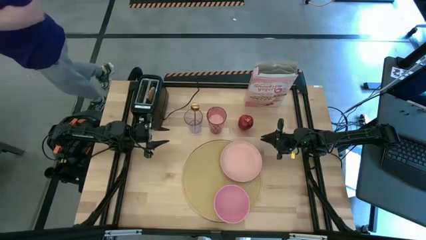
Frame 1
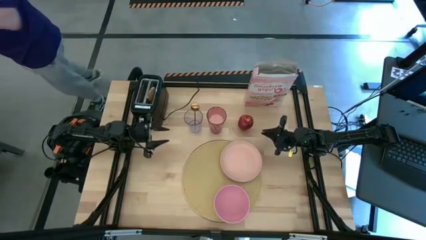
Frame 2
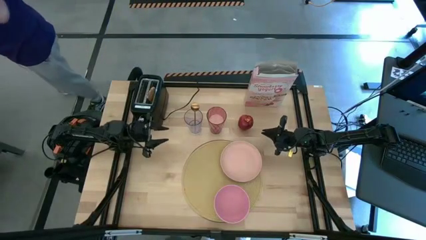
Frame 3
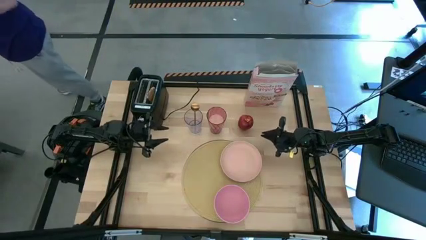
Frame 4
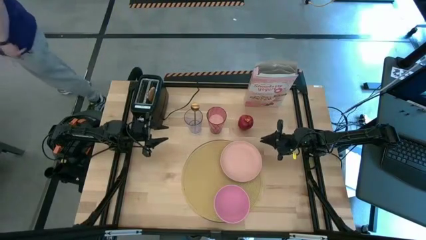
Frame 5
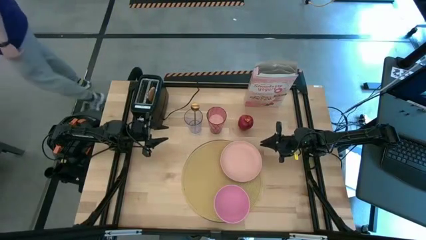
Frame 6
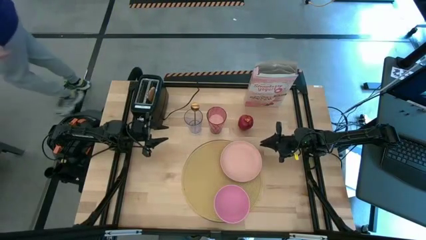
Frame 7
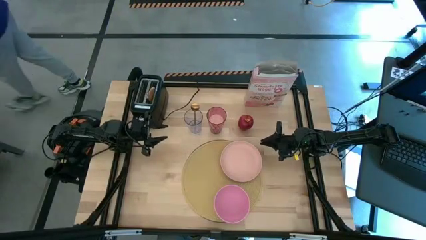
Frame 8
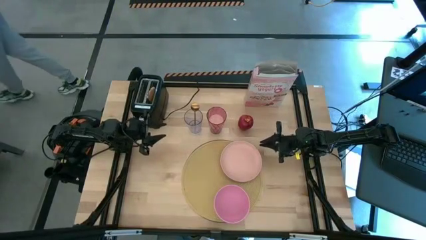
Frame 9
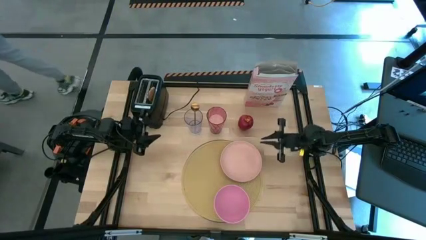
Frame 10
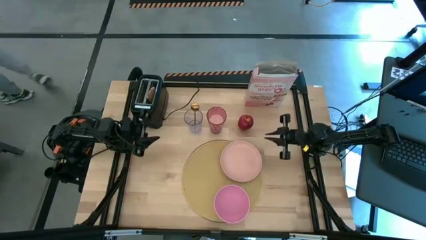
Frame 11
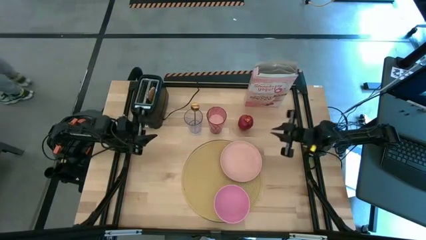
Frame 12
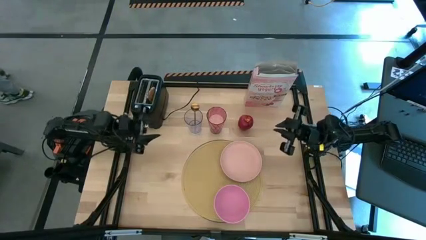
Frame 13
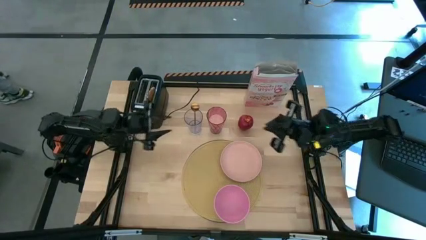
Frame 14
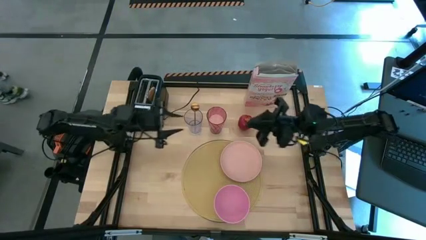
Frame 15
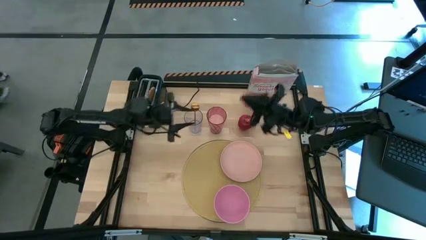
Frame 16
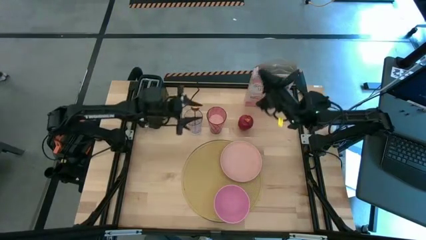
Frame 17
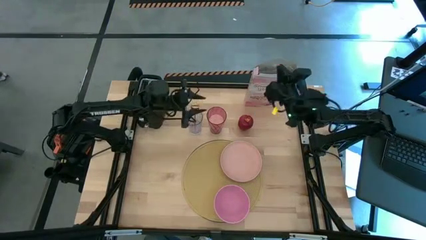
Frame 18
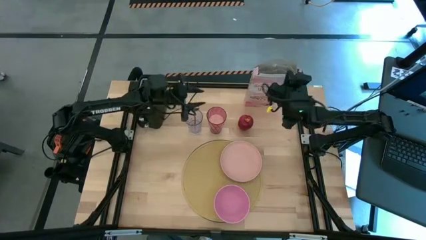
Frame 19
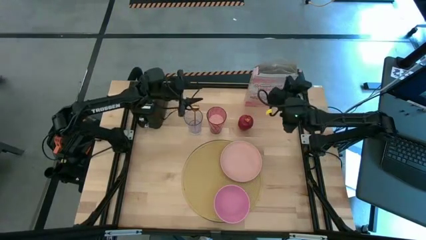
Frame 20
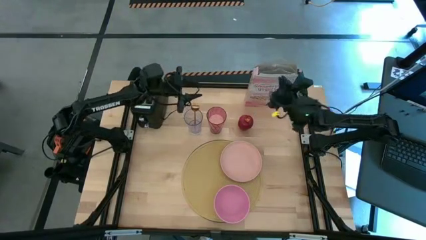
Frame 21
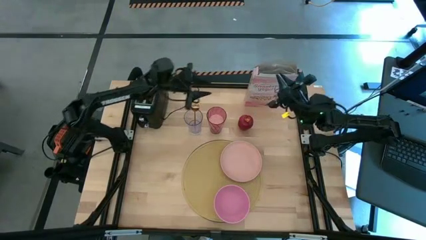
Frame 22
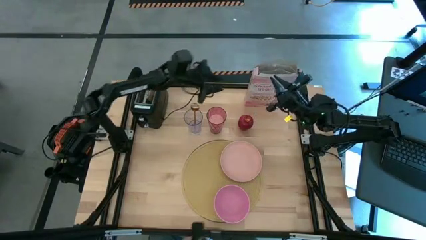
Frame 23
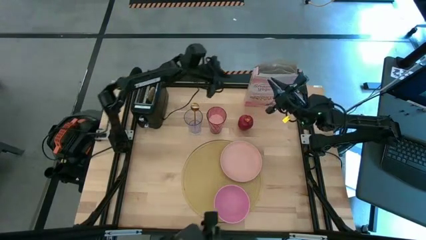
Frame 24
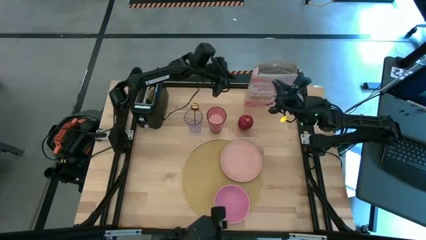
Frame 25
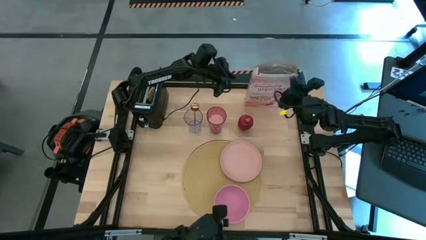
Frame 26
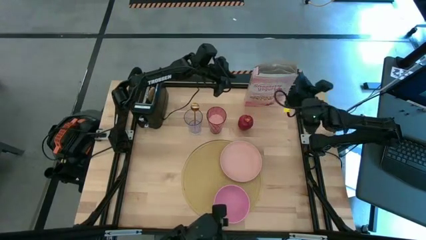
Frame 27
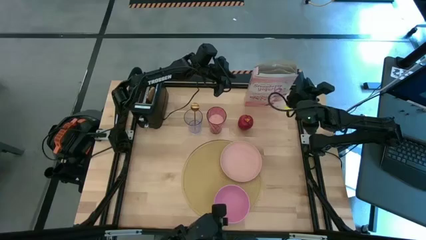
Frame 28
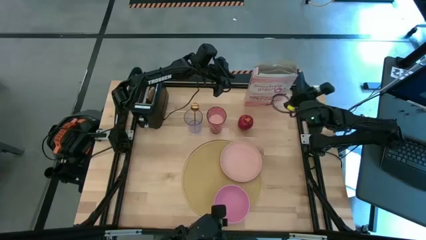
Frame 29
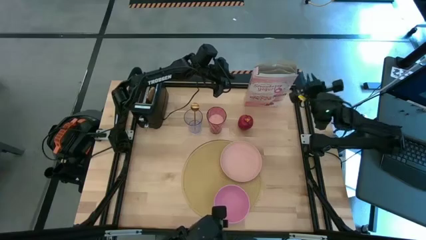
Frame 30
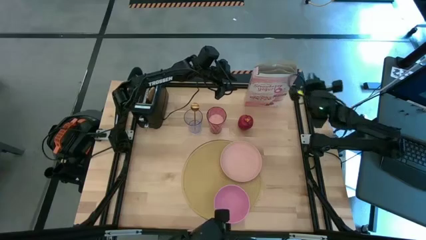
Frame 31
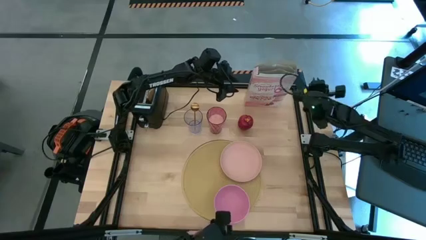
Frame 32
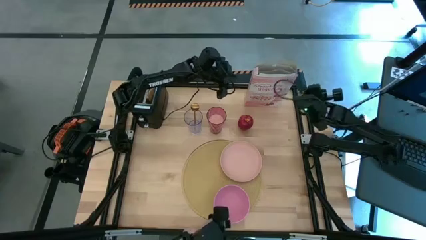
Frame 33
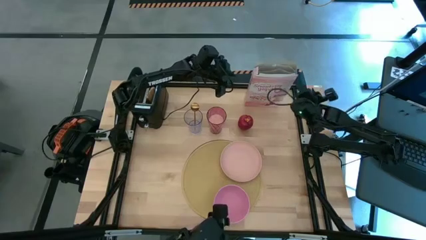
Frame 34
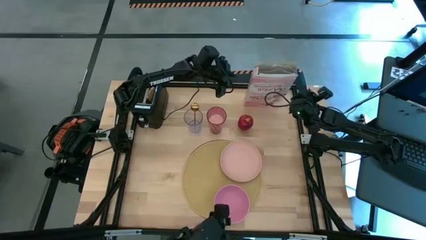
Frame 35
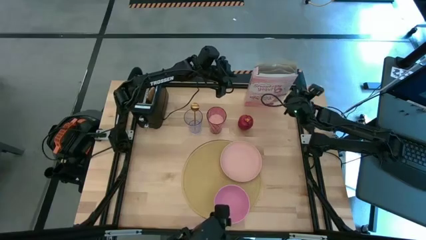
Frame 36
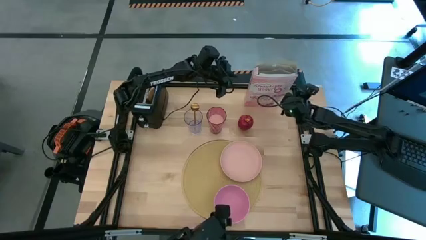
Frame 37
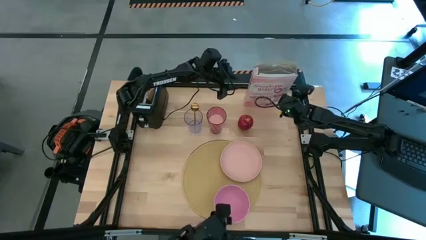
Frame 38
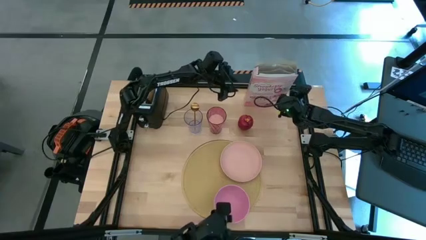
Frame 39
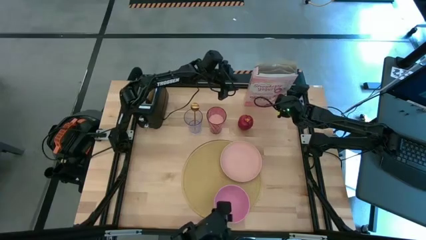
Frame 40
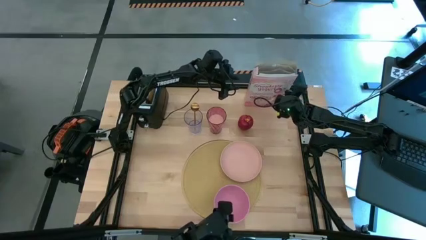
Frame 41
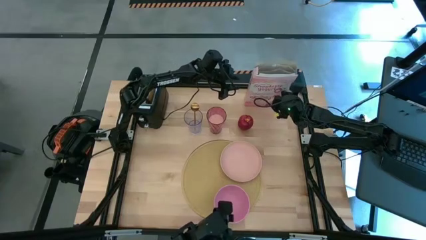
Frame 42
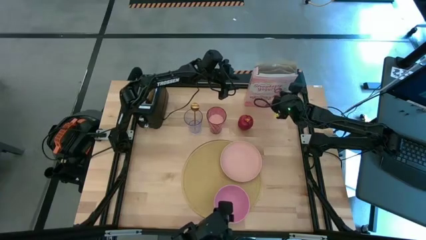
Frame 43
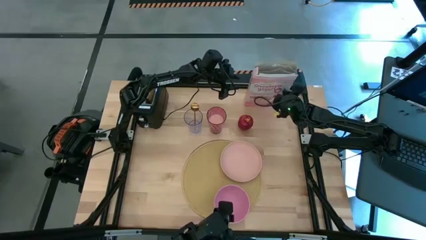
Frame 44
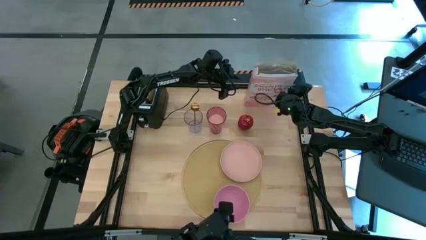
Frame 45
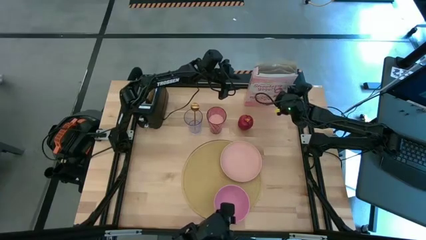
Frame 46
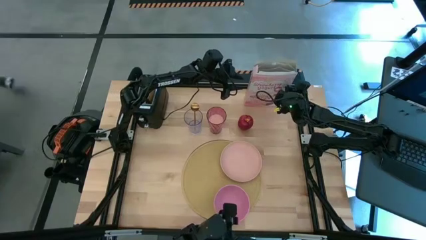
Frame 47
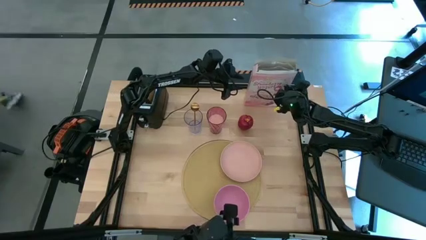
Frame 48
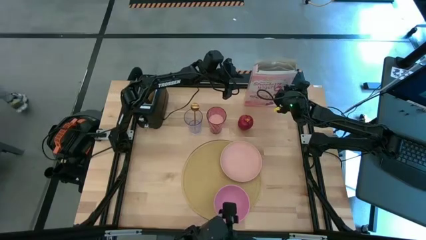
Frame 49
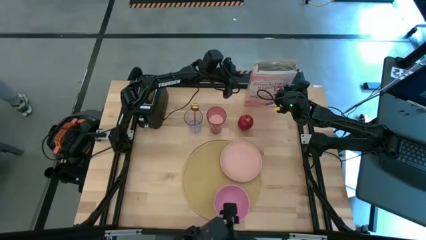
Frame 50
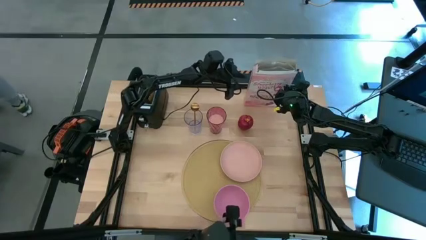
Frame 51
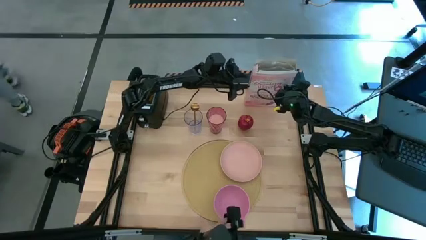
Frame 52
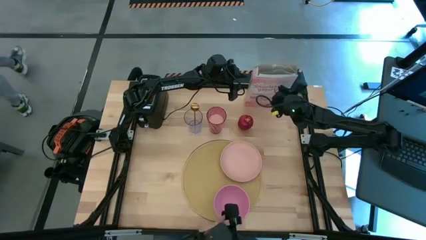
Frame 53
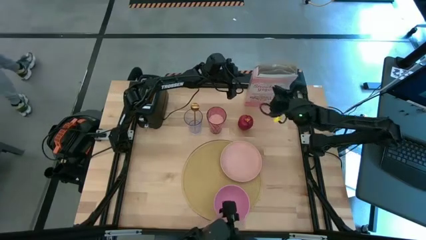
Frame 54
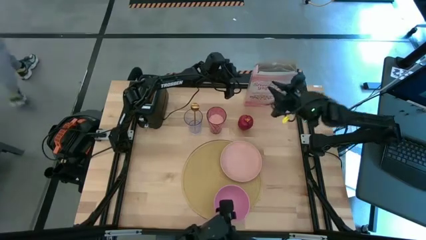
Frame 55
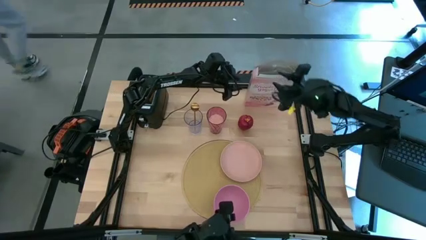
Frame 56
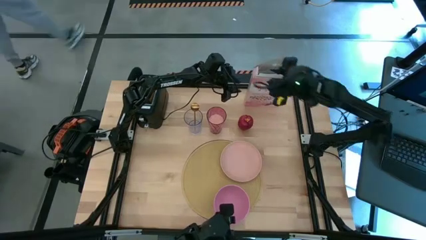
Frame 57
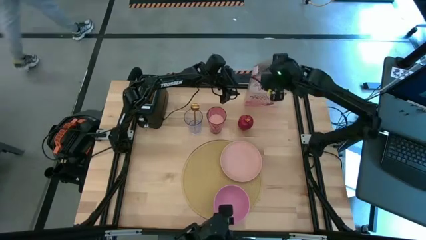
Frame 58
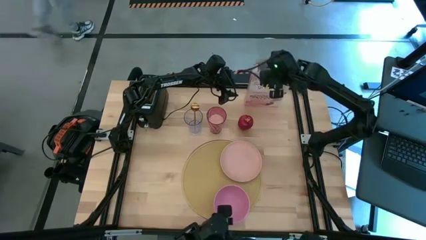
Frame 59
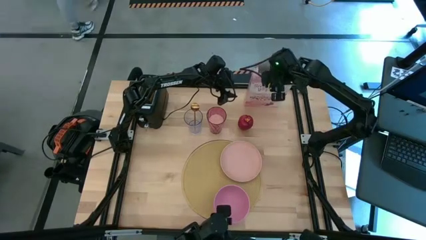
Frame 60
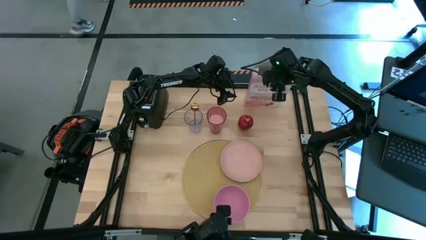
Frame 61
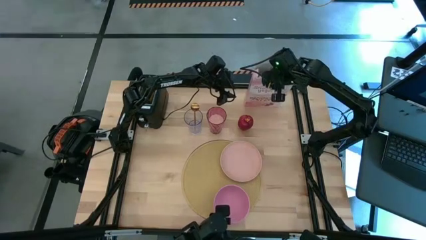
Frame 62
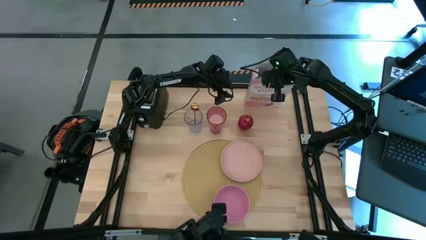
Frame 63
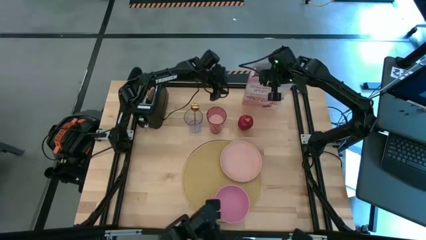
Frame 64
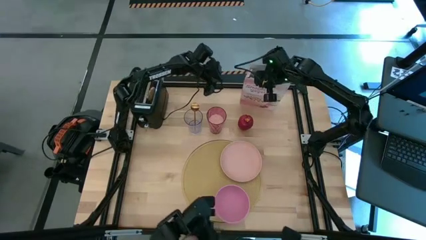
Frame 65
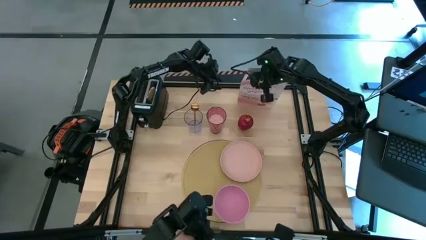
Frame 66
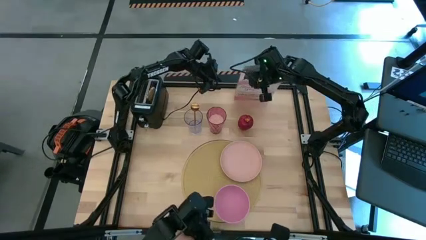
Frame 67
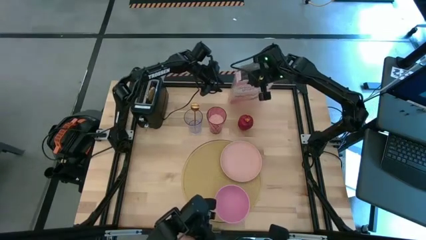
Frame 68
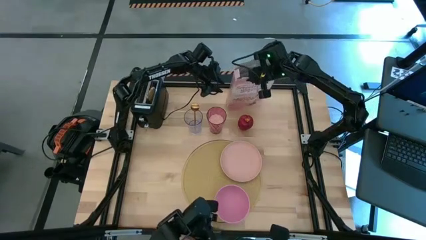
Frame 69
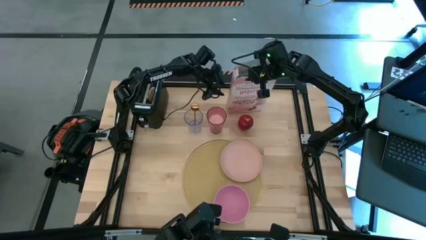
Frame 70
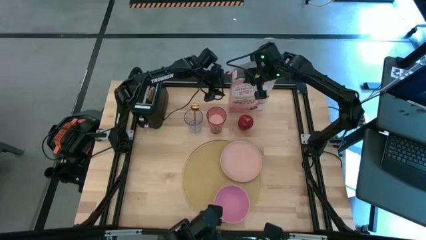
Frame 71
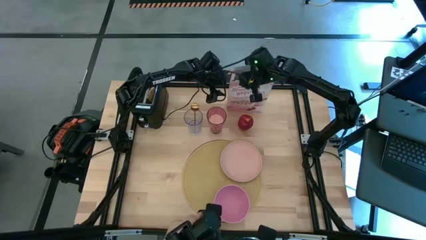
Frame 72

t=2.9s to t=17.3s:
Task: Arrange a breakfast setting
Pour the cereal from the pink cereal box into the pink bowl
